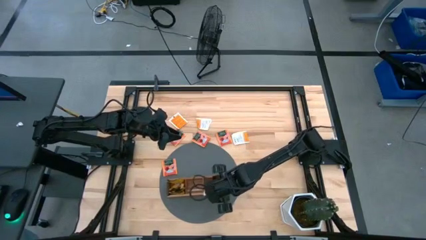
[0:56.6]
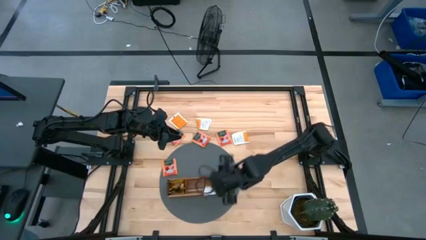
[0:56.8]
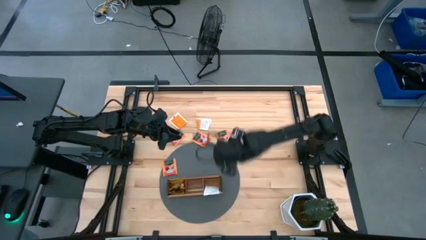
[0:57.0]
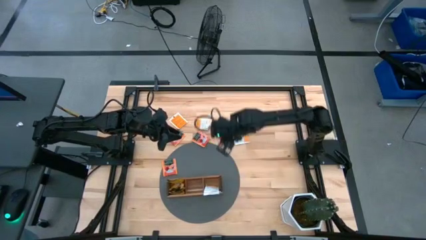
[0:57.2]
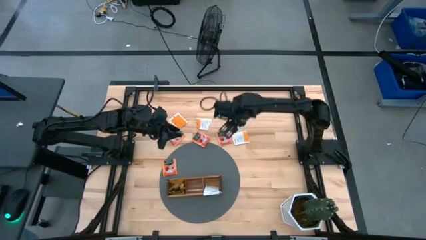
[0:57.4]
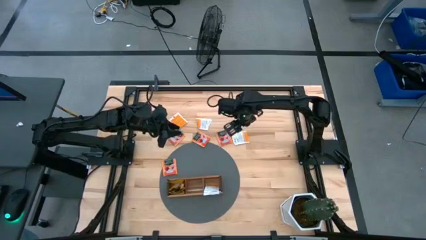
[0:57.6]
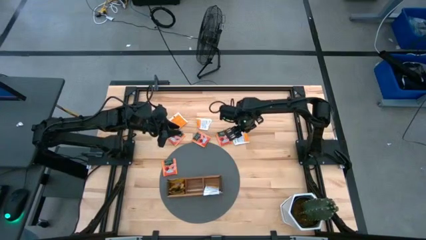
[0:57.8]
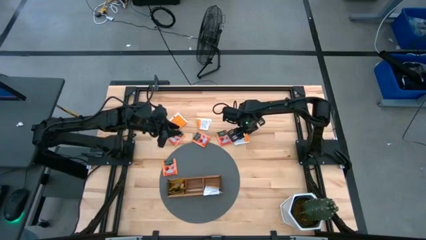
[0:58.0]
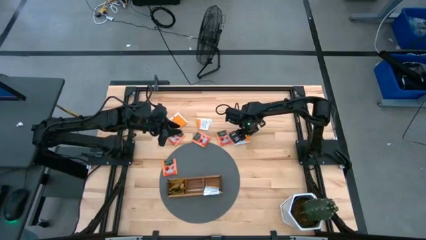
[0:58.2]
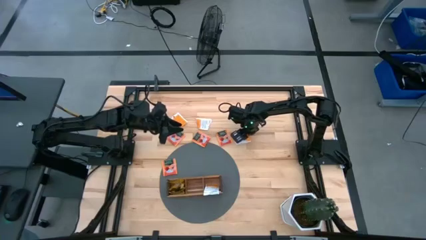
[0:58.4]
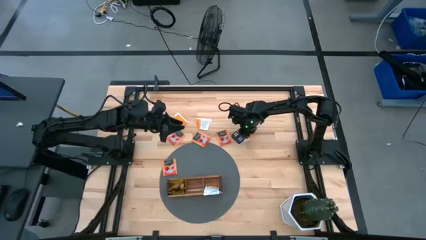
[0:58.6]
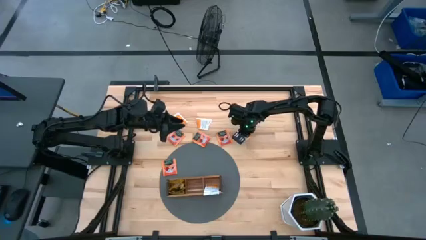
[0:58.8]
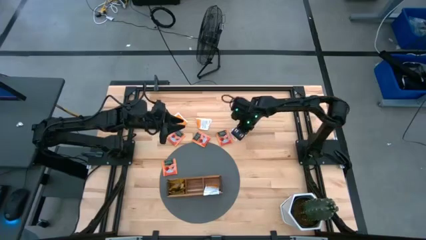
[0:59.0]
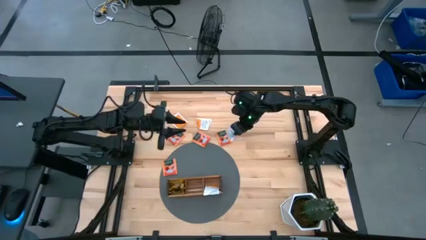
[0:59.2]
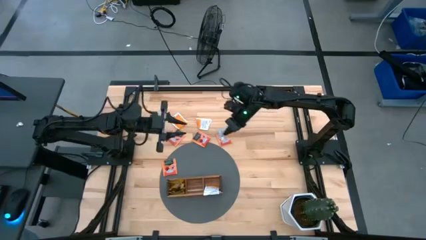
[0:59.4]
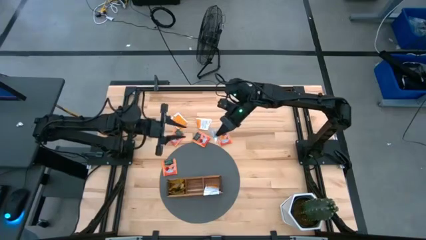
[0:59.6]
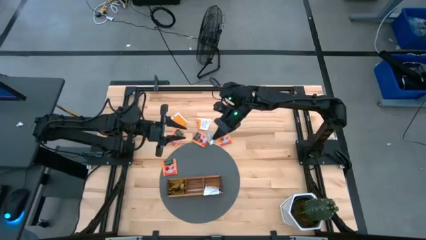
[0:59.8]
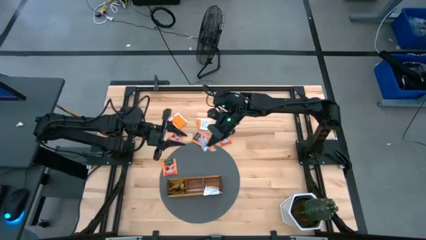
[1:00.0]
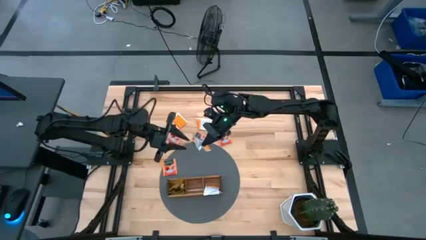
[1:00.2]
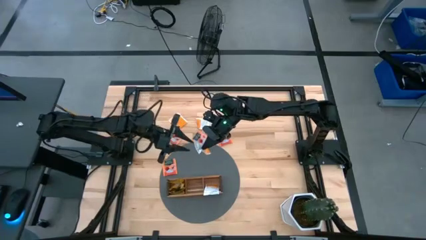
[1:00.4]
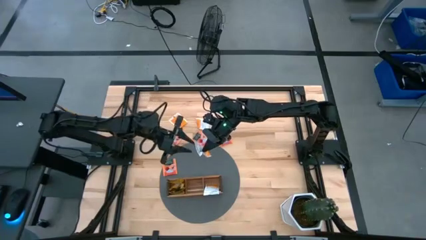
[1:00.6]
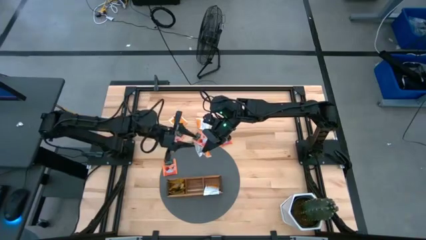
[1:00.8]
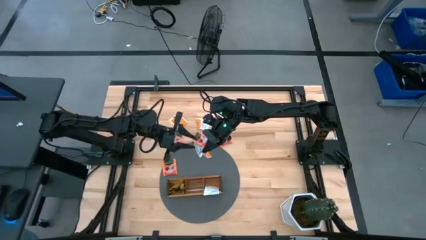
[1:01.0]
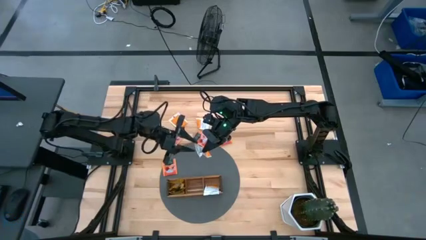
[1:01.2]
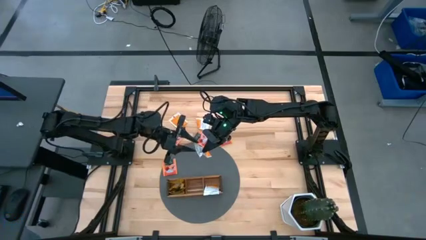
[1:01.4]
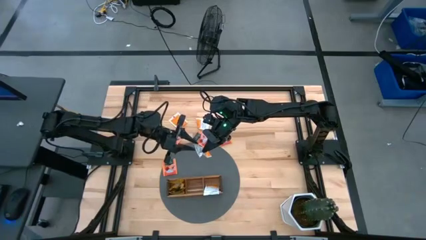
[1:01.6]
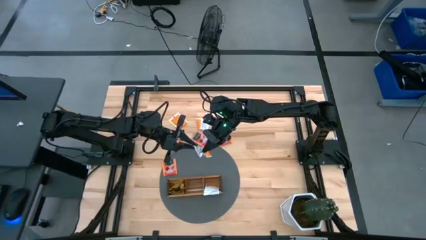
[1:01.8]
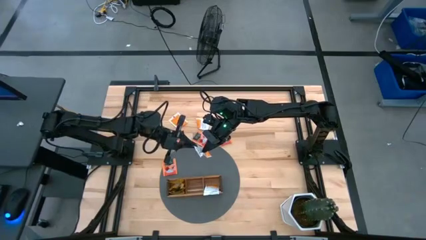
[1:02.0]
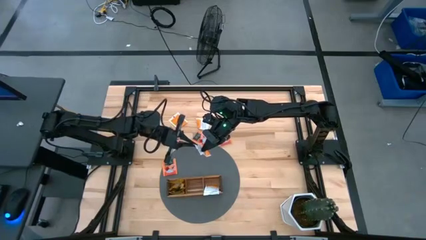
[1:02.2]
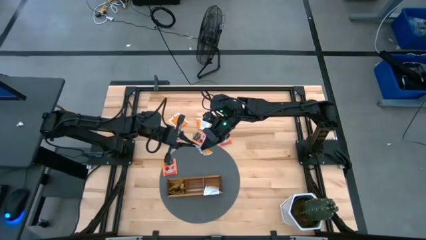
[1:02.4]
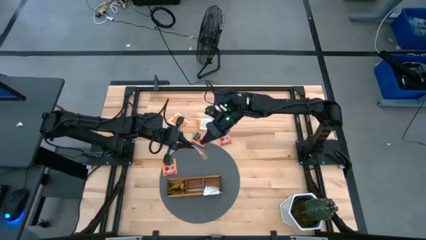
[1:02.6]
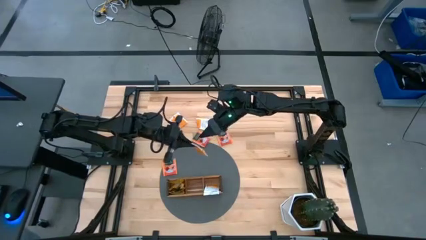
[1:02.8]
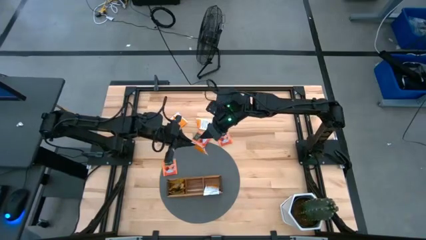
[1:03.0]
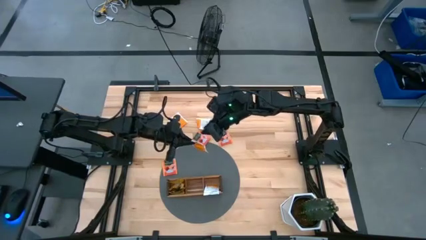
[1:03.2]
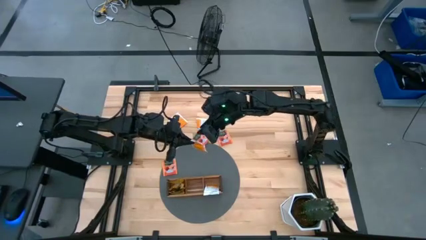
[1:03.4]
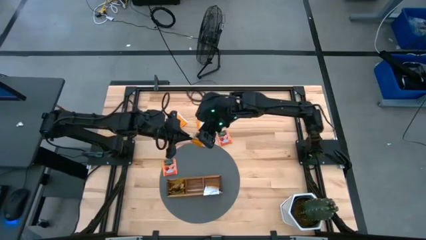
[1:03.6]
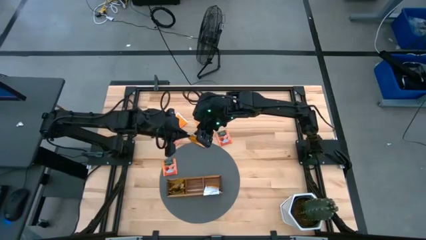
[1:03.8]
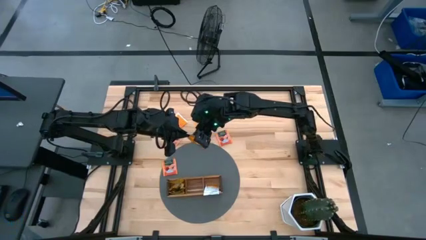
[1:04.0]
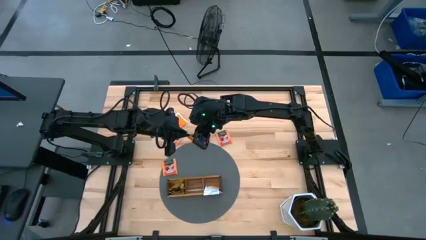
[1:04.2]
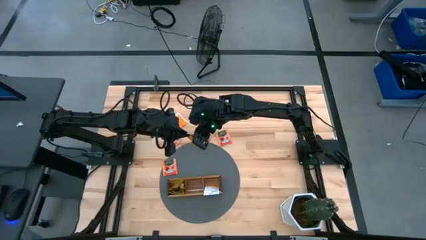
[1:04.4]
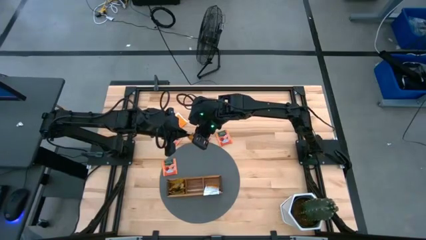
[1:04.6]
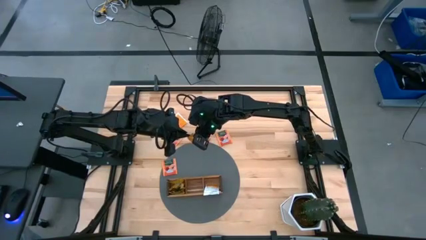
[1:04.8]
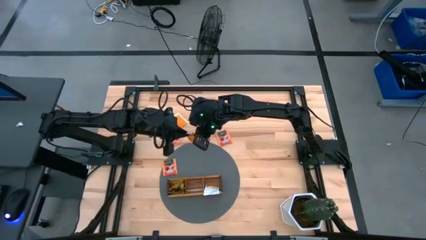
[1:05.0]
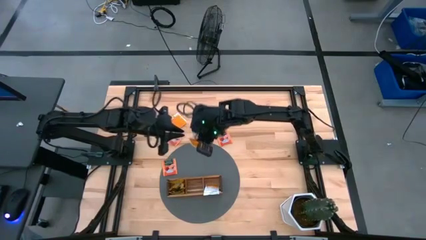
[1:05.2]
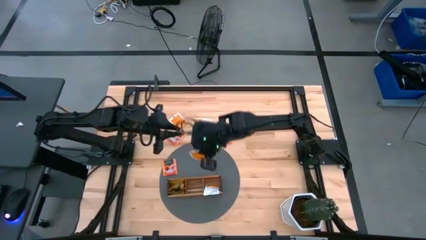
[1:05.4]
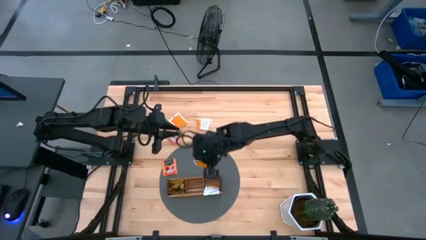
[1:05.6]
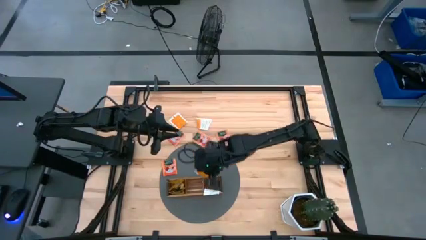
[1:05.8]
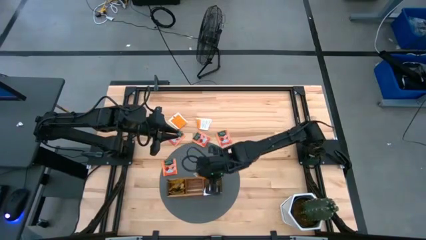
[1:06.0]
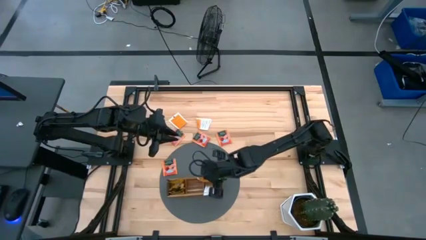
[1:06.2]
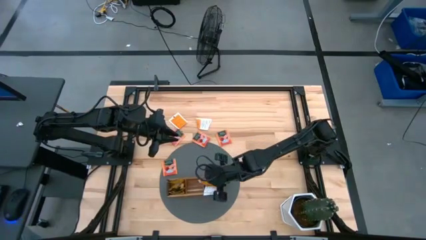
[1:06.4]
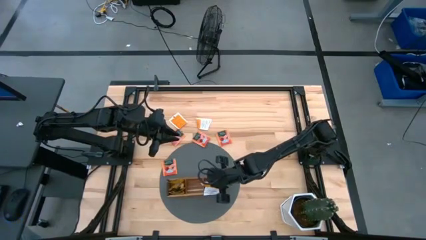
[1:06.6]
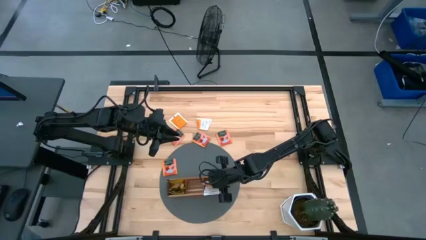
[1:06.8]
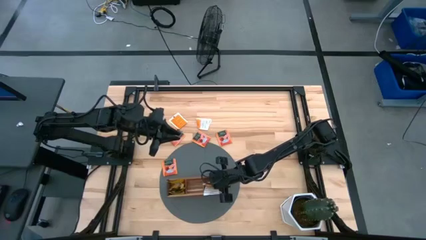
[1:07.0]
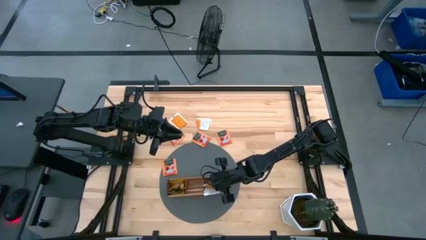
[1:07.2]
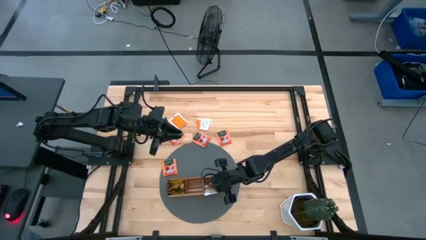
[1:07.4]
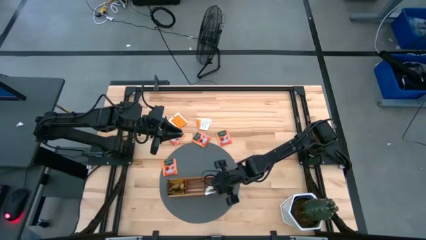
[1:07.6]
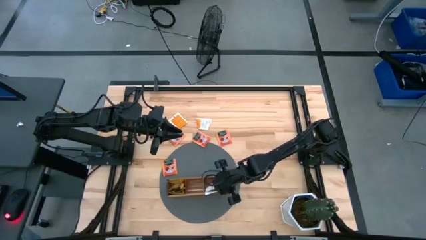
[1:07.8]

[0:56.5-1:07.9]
Task: Pick & Place Tea
Put the orange white tea bag into the right section of the wooden organizer
